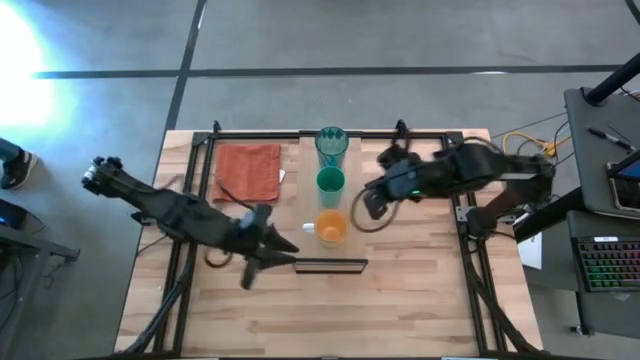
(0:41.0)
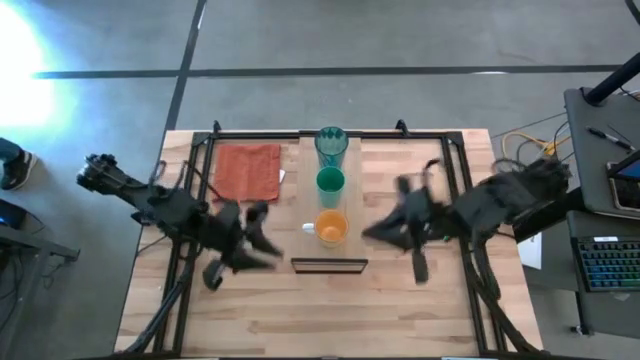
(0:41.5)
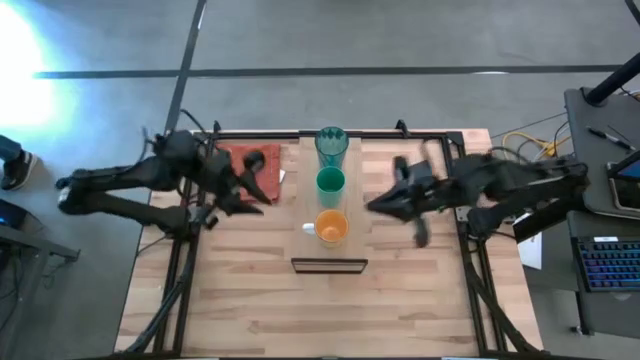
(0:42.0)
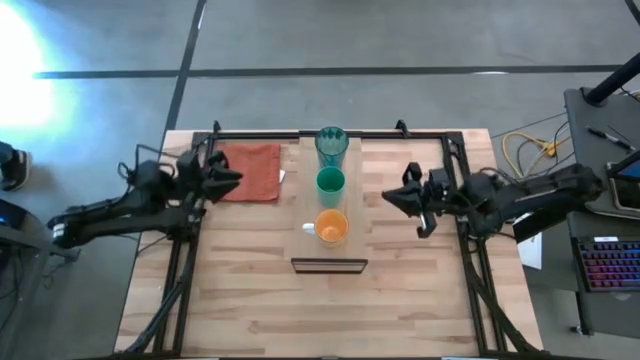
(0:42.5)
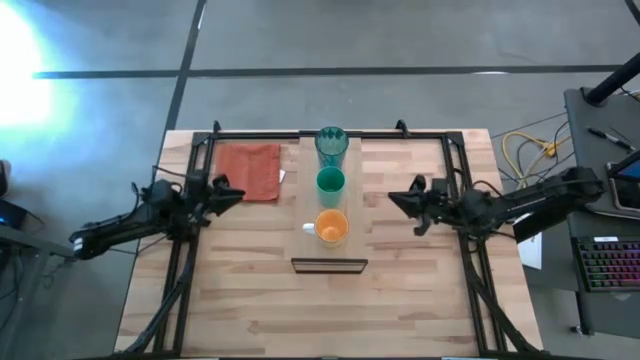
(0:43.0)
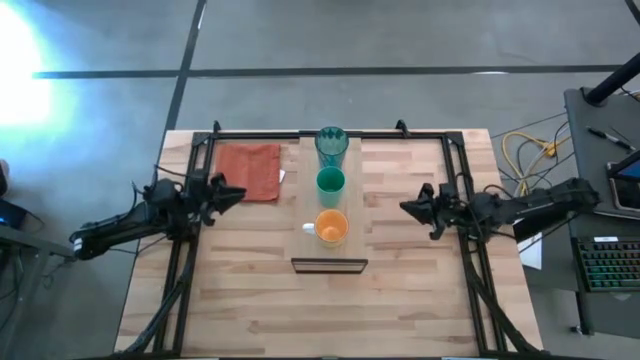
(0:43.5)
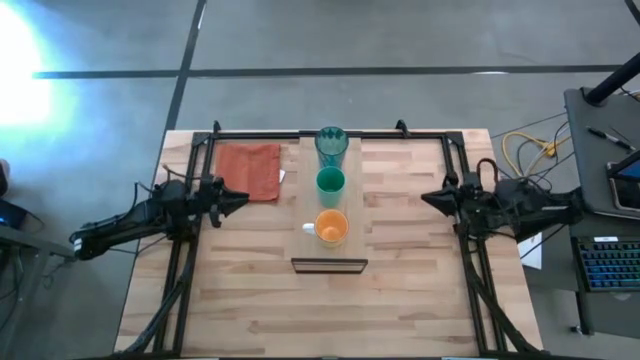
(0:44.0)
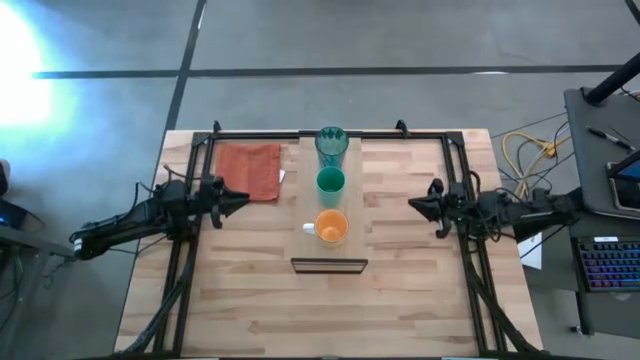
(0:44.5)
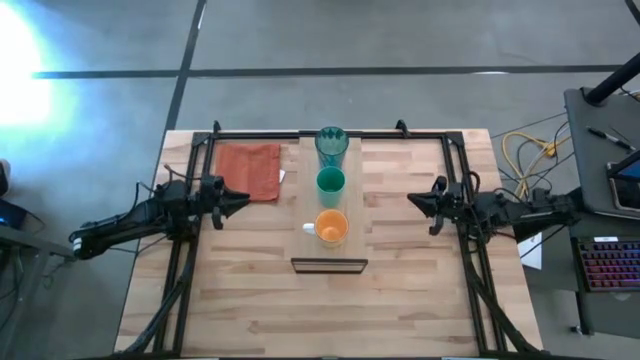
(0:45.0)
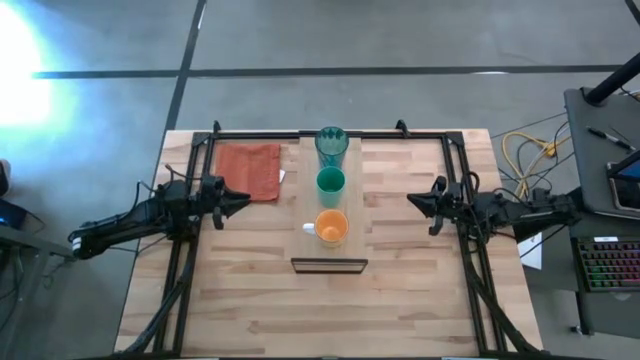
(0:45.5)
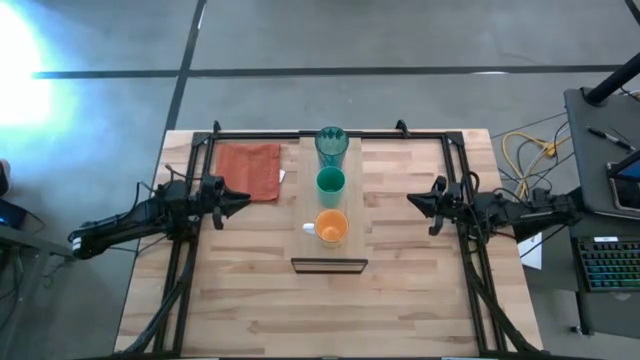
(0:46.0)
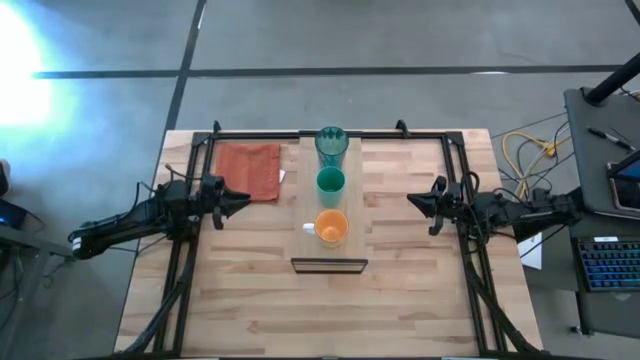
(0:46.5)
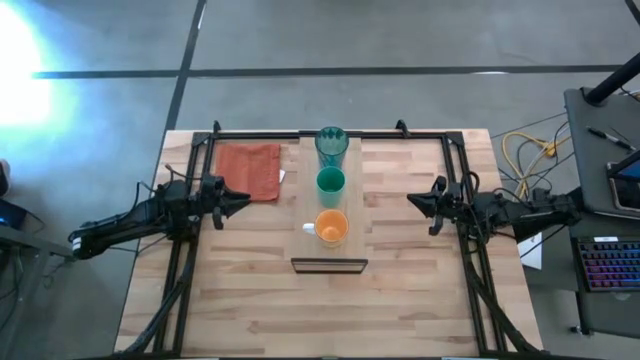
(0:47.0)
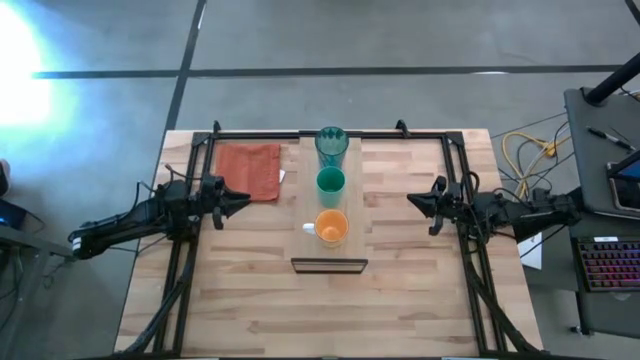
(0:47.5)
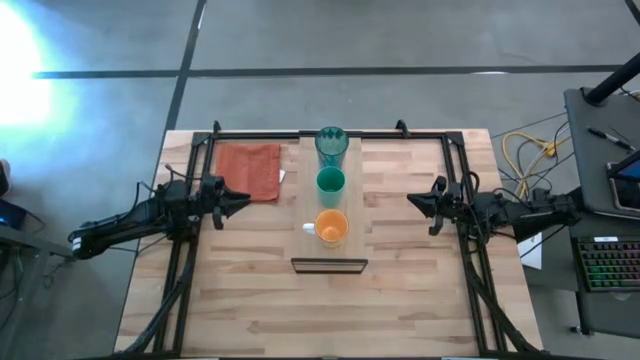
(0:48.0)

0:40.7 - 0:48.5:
Task: Stack small to large cups/mugs on shelf
Return to Home Position

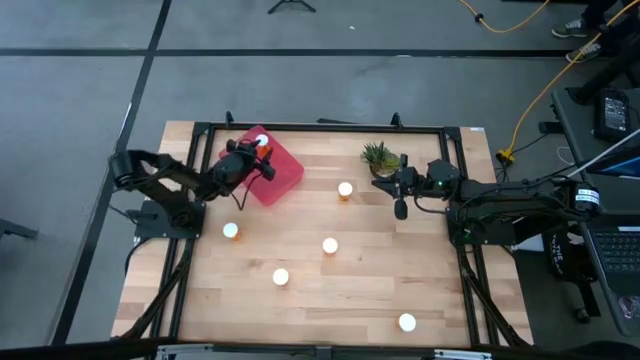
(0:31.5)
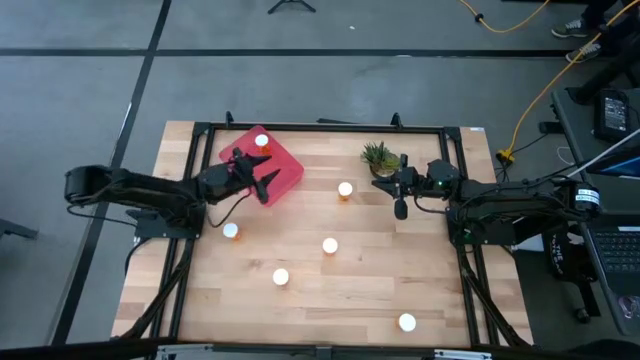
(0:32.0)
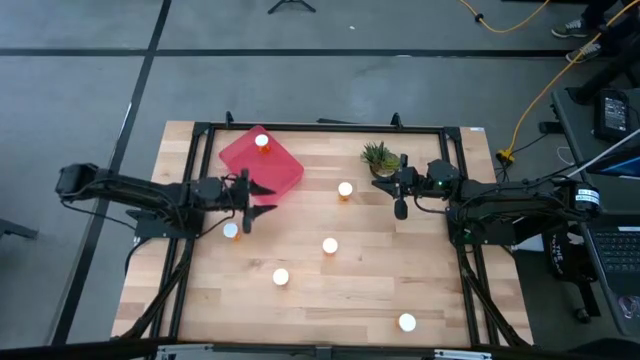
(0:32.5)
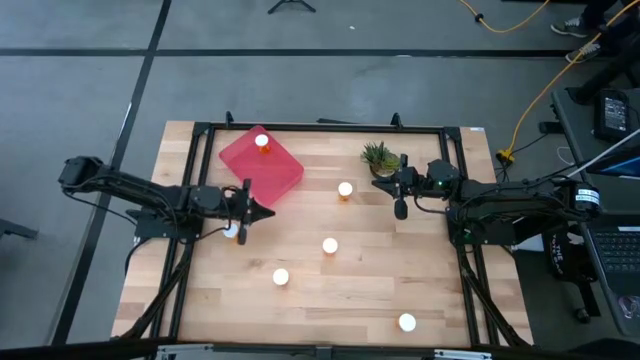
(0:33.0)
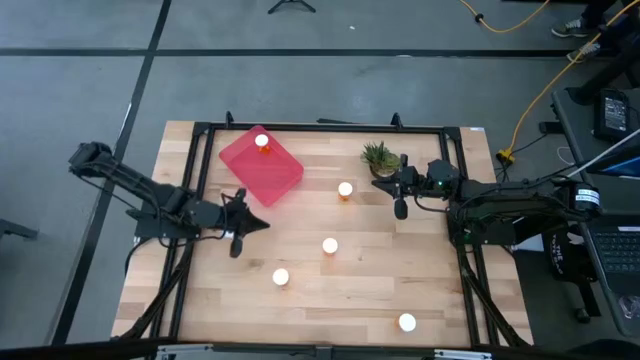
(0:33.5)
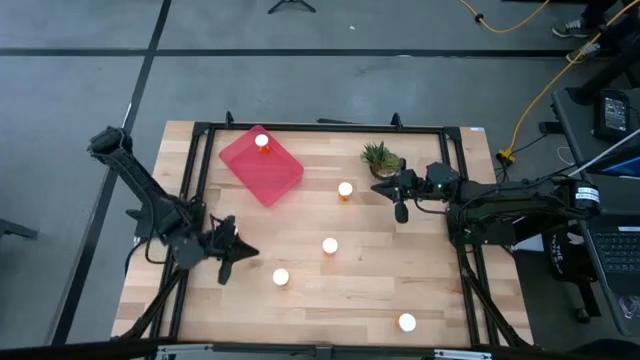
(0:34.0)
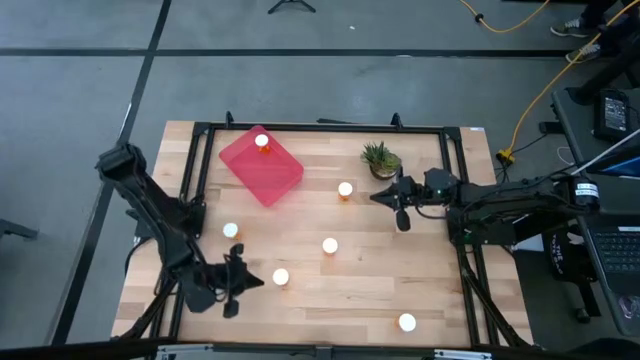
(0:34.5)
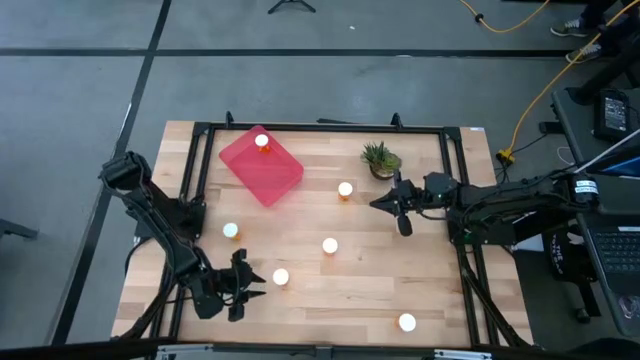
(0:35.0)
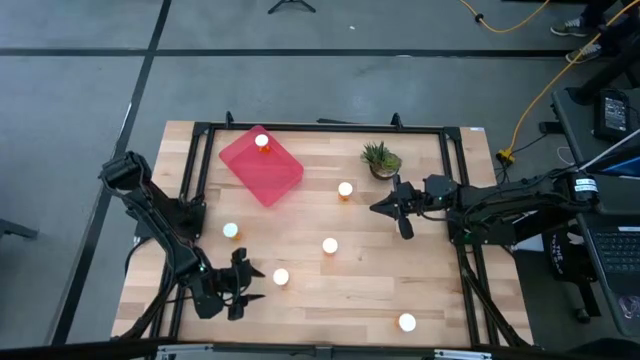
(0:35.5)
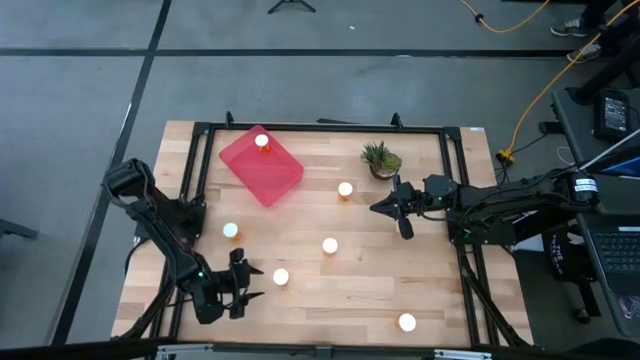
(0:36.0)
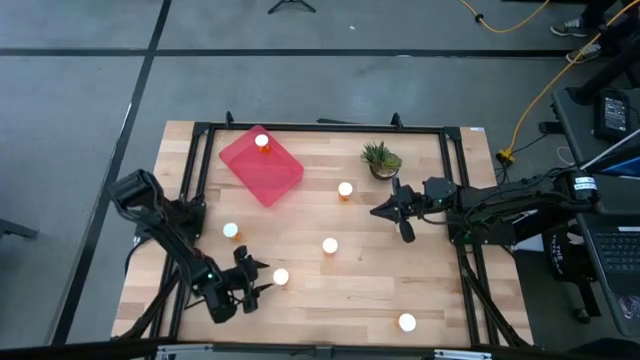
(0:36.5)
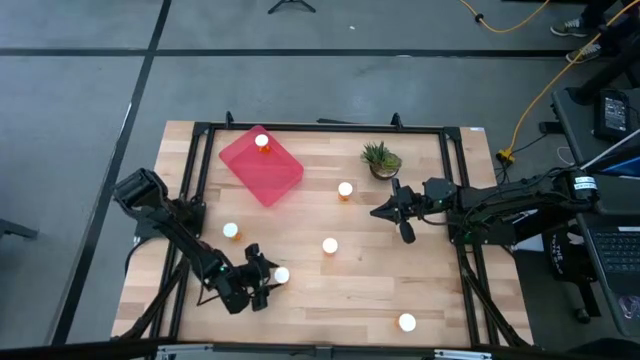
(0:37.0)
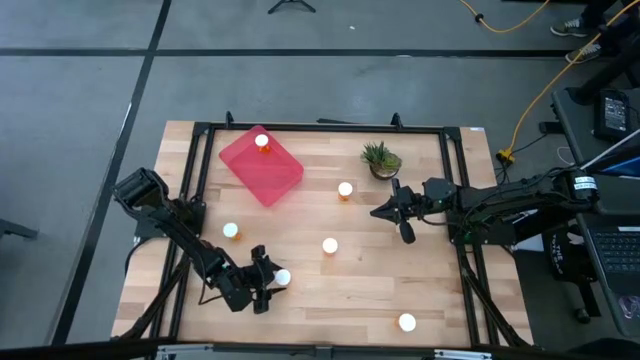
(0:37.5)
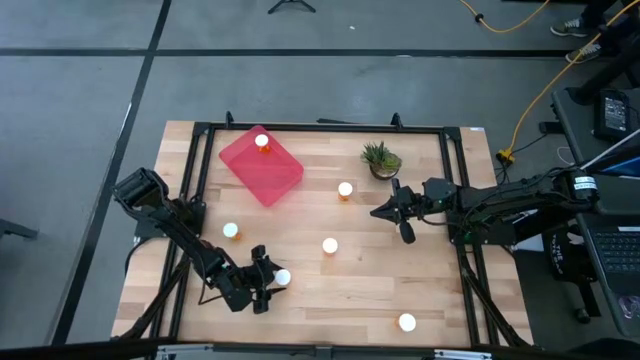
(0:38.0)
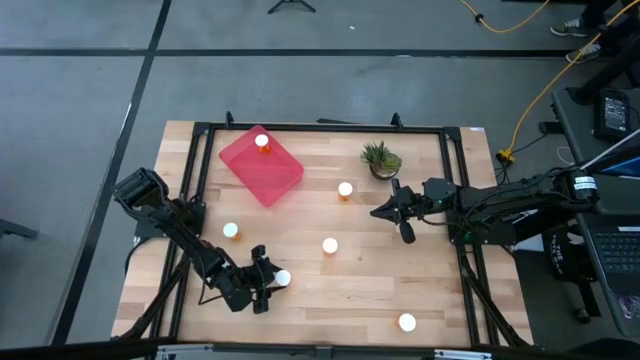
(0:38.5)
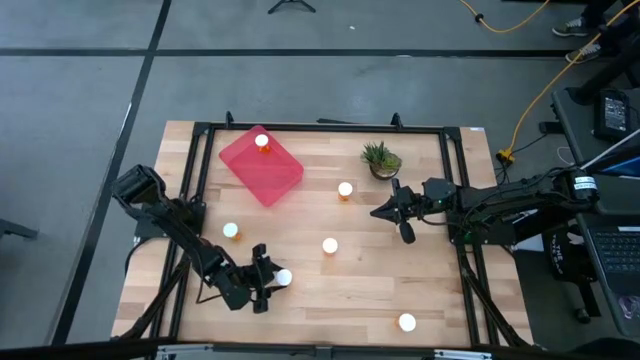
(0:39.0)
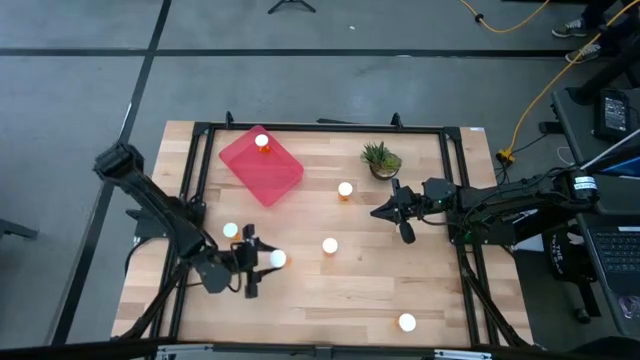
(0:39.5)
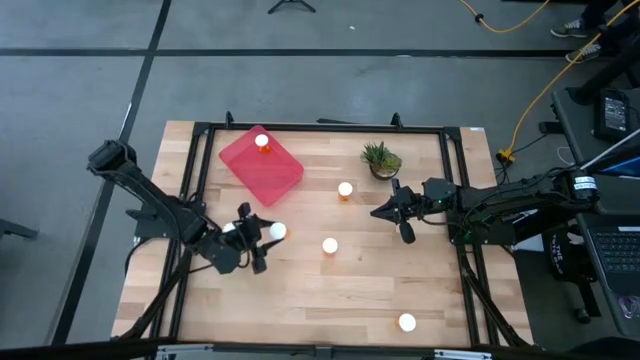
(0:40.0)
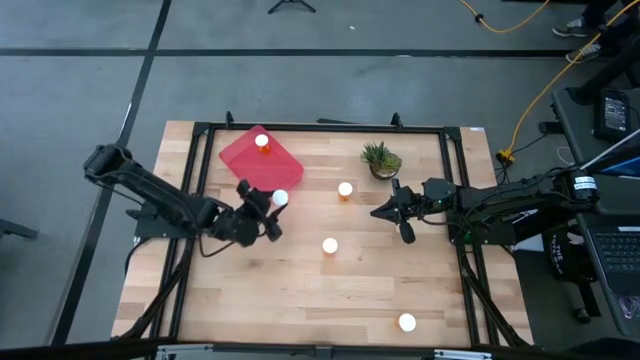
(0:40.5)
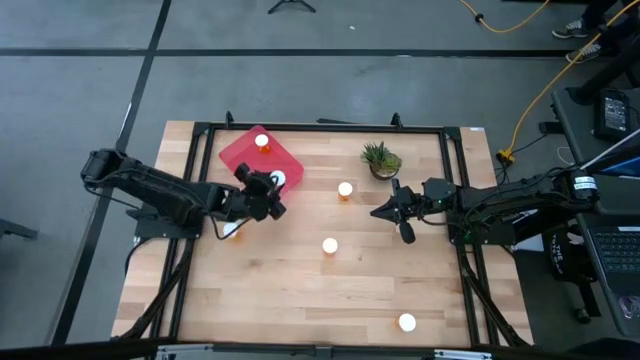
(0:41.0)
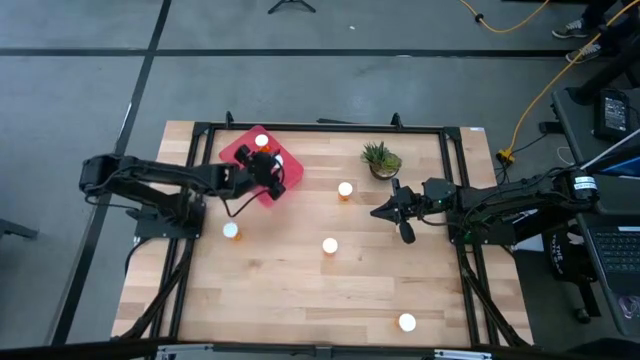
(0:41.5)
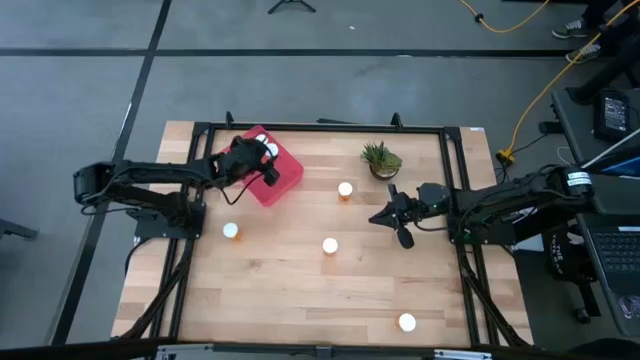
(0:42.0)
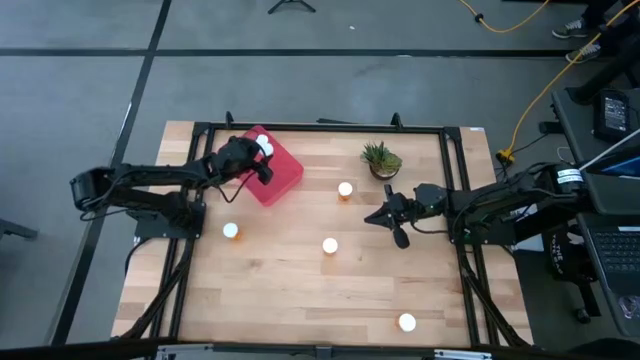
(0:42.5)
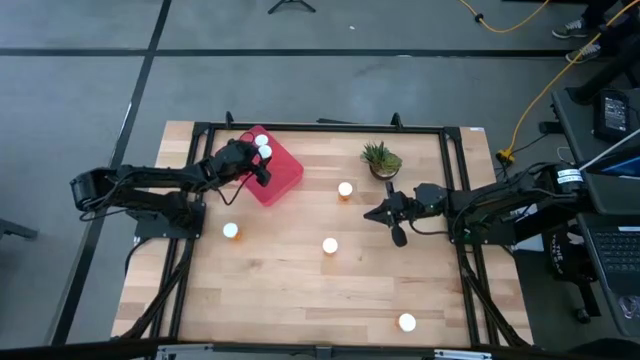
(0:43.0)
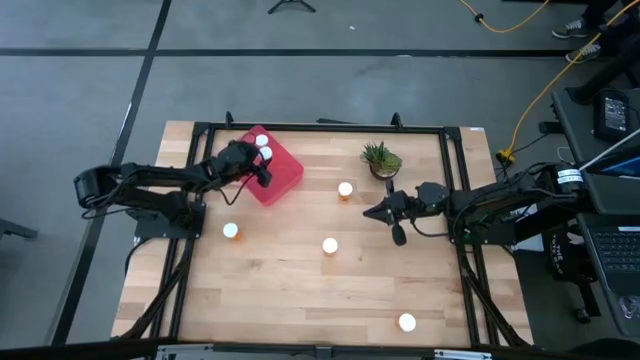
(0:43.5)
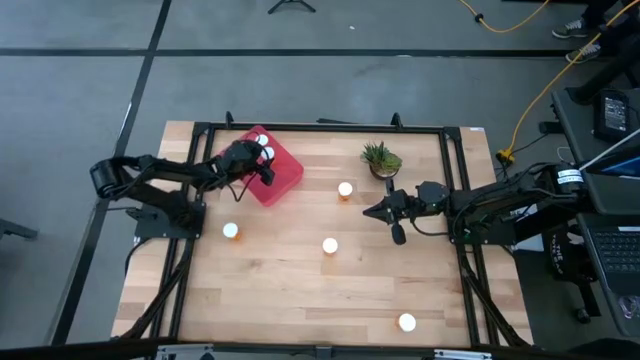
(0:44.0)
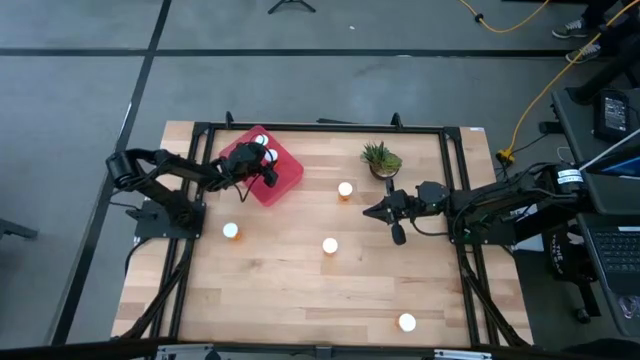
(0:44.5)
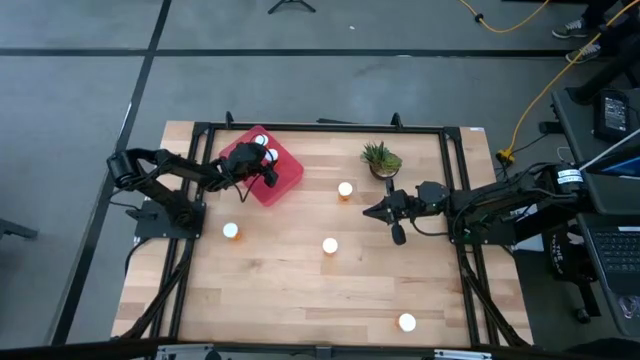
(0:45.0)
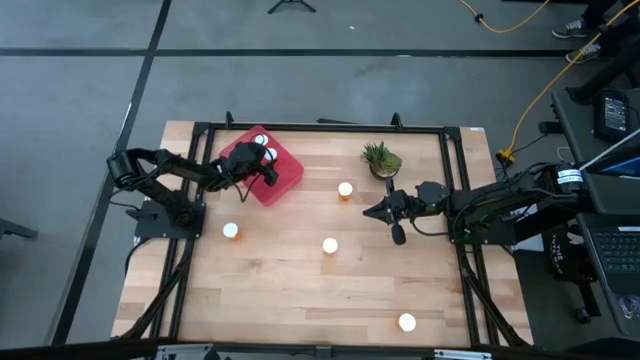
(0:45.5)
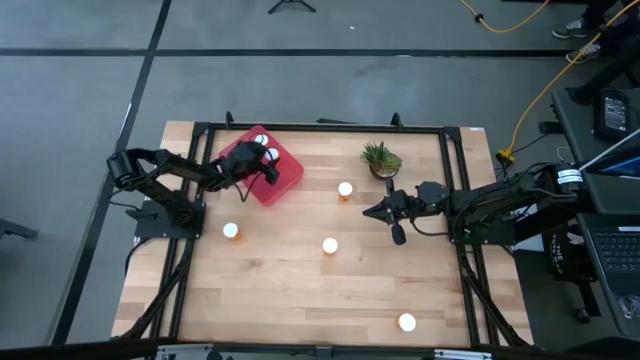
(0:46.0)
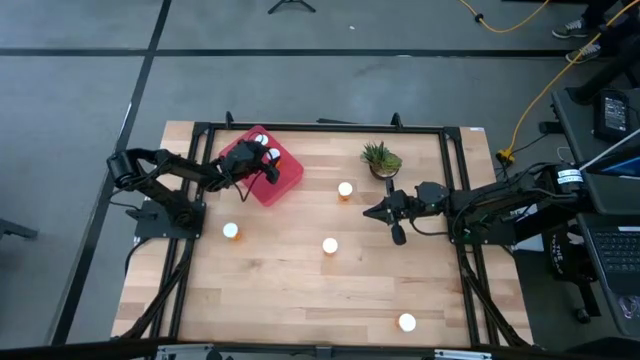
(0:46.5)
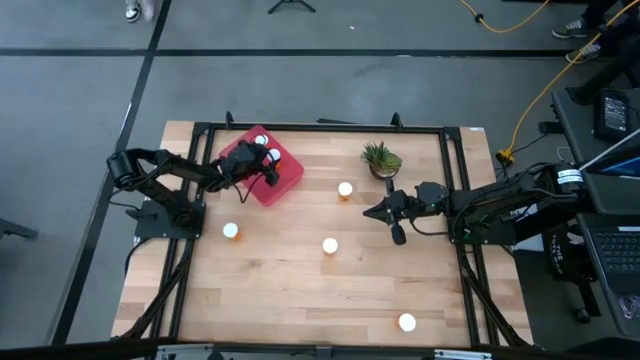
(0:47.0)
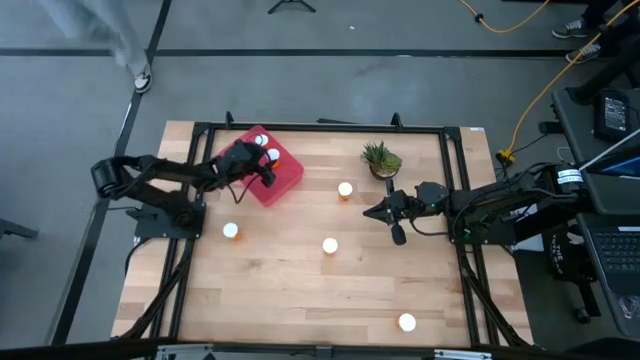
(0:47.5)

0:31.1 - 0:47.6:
Task: Pick and place pill bottles into a basket
Put the orange pill bottle into the red container
